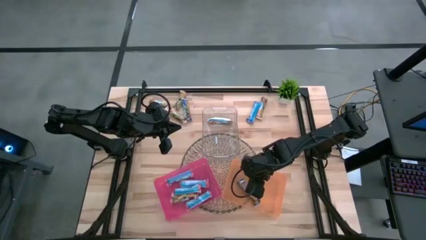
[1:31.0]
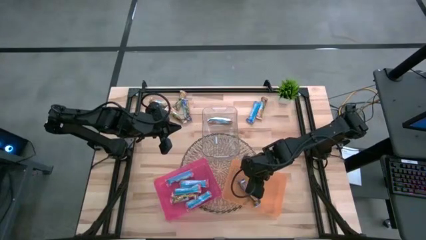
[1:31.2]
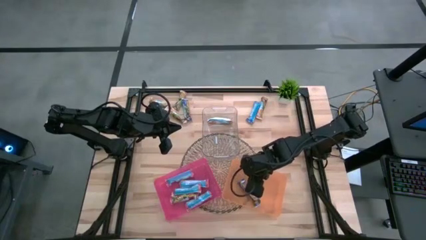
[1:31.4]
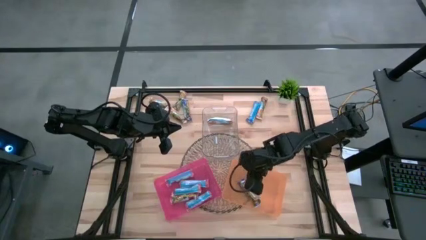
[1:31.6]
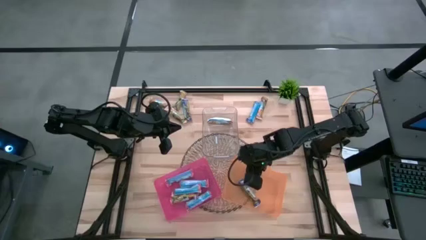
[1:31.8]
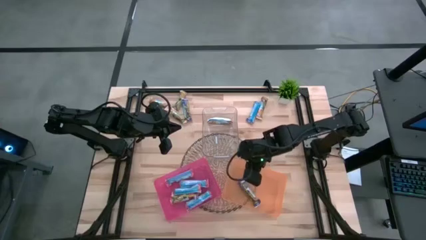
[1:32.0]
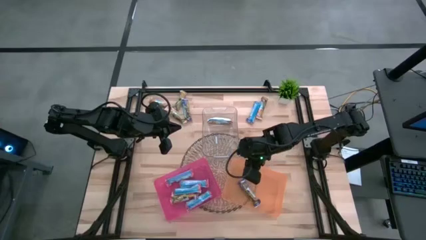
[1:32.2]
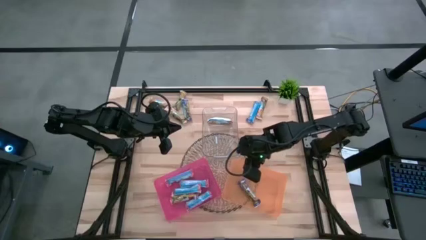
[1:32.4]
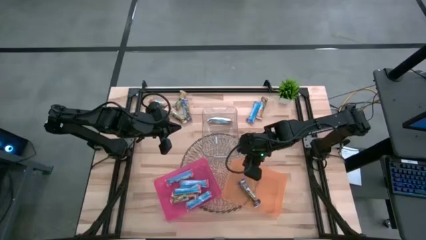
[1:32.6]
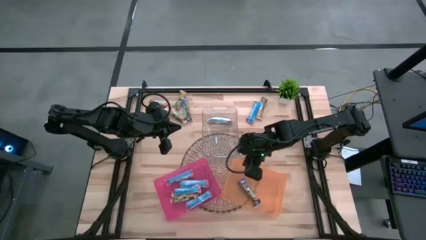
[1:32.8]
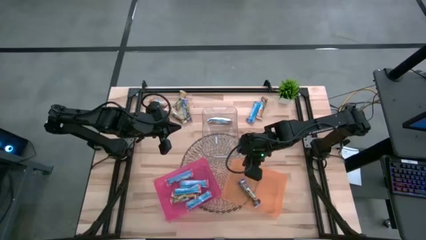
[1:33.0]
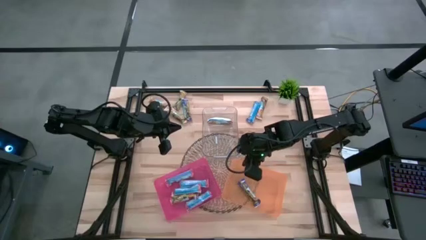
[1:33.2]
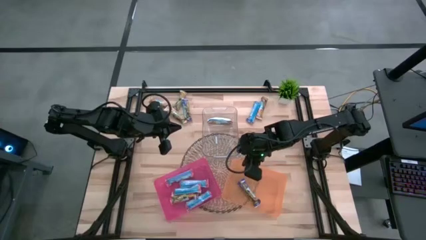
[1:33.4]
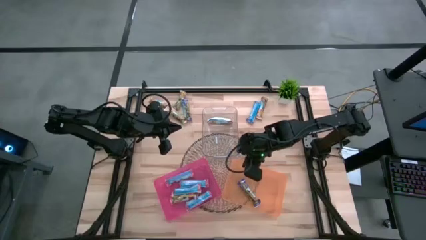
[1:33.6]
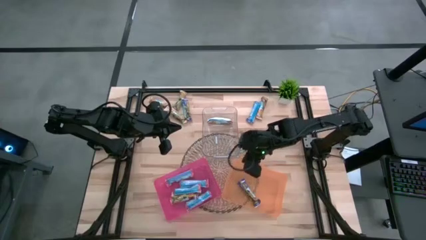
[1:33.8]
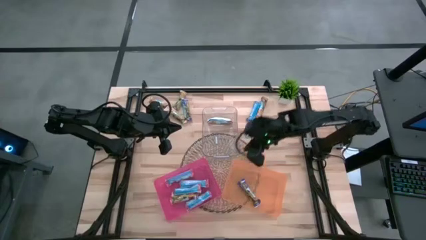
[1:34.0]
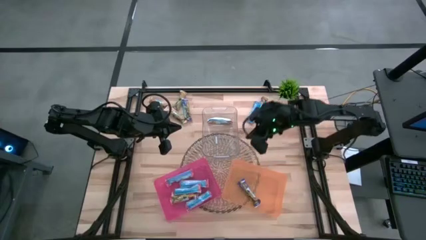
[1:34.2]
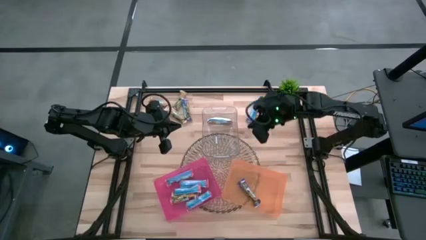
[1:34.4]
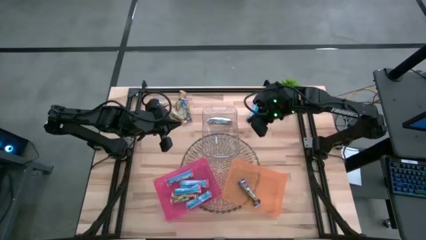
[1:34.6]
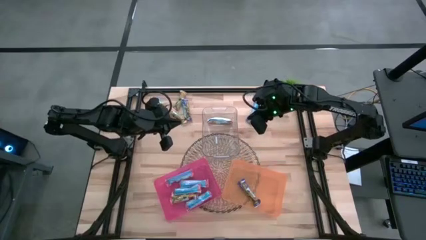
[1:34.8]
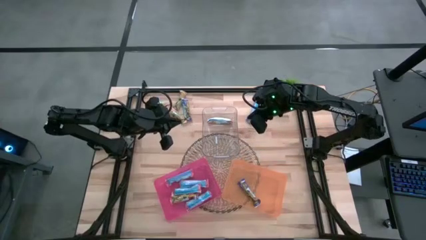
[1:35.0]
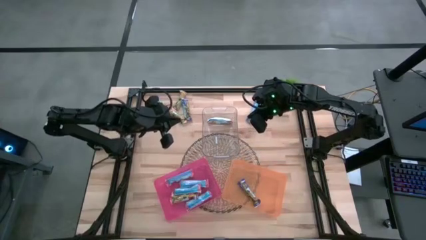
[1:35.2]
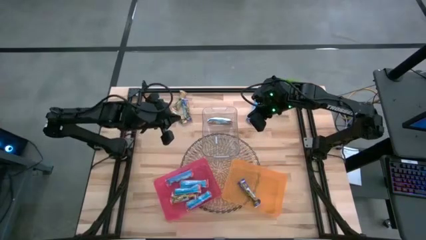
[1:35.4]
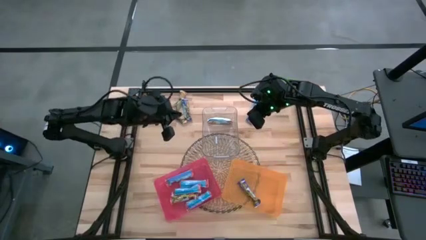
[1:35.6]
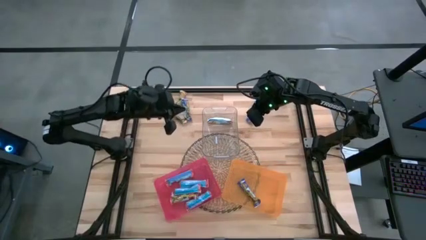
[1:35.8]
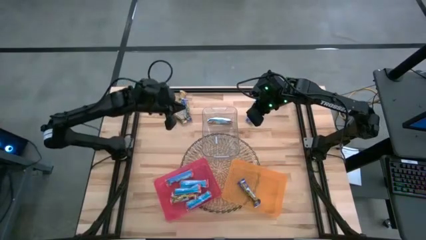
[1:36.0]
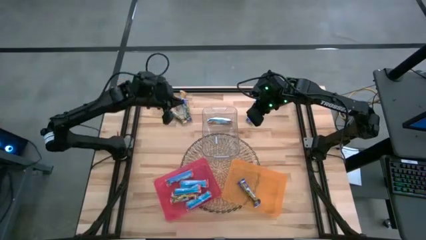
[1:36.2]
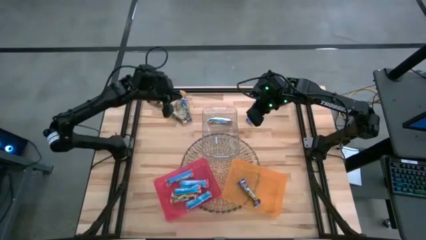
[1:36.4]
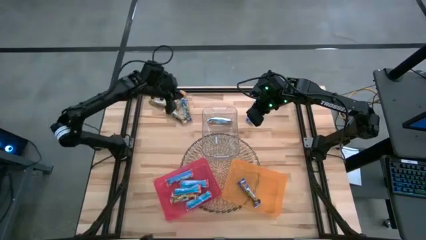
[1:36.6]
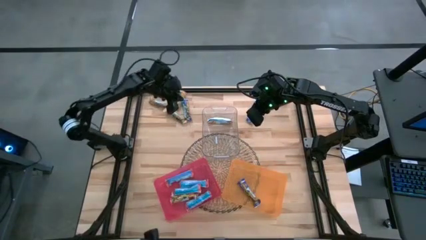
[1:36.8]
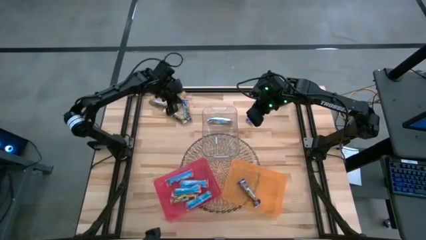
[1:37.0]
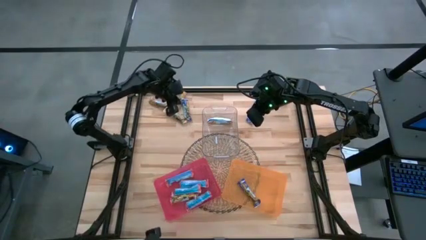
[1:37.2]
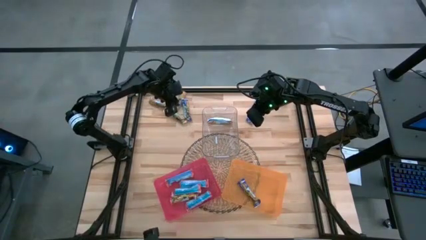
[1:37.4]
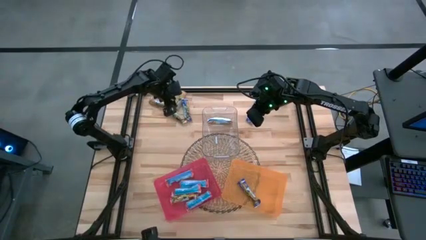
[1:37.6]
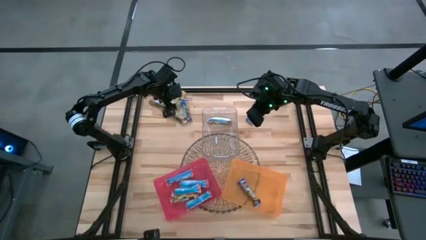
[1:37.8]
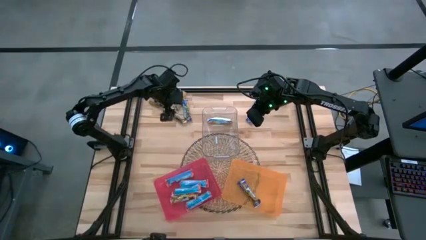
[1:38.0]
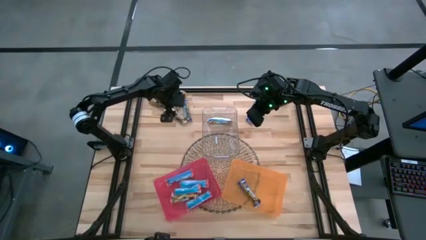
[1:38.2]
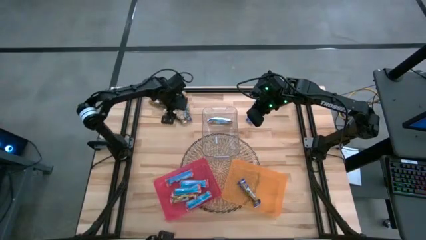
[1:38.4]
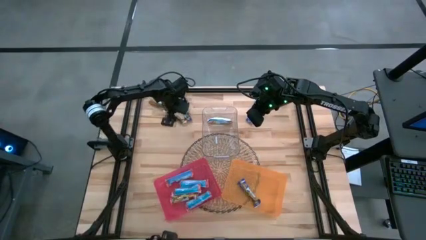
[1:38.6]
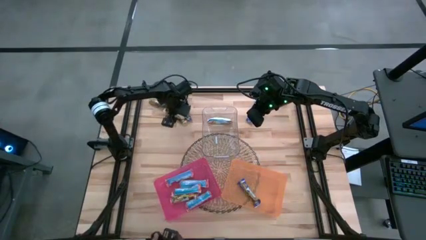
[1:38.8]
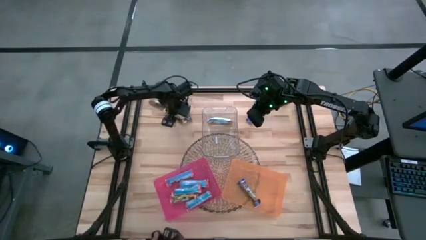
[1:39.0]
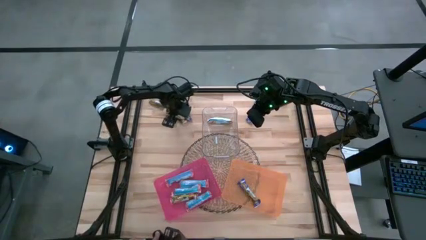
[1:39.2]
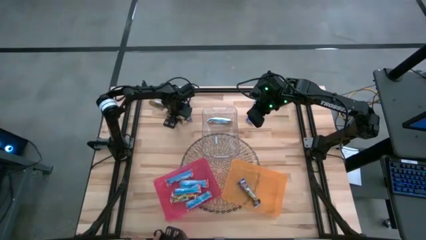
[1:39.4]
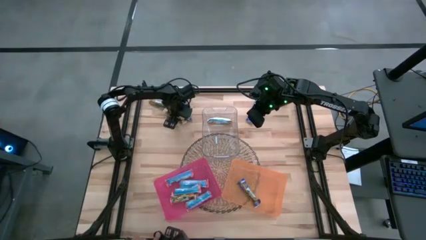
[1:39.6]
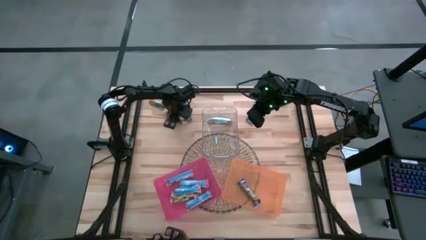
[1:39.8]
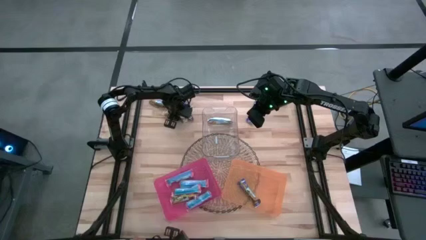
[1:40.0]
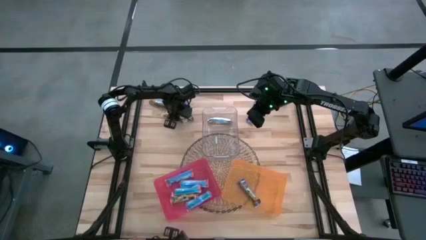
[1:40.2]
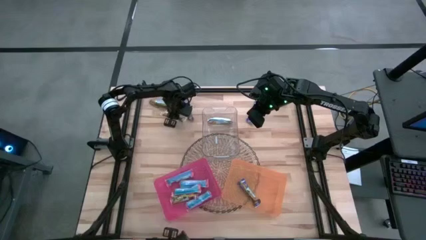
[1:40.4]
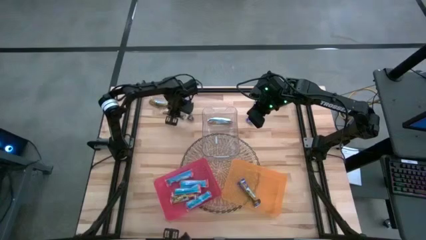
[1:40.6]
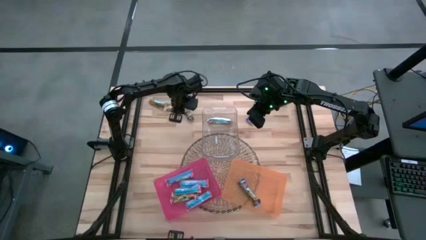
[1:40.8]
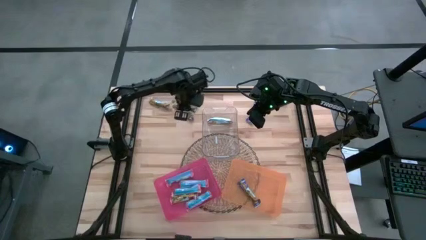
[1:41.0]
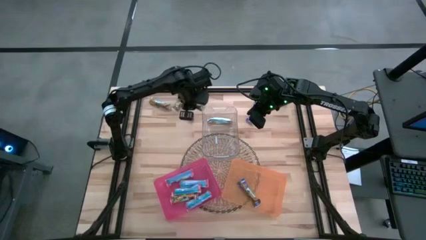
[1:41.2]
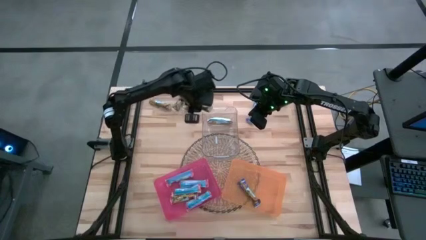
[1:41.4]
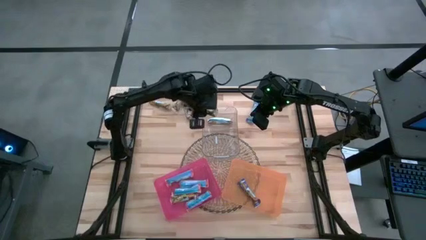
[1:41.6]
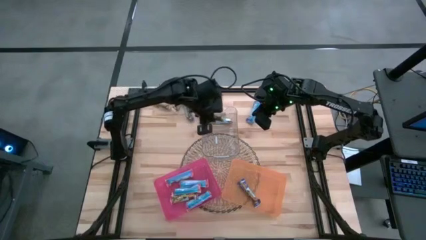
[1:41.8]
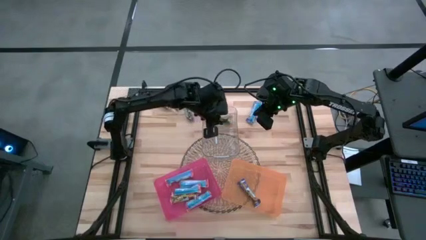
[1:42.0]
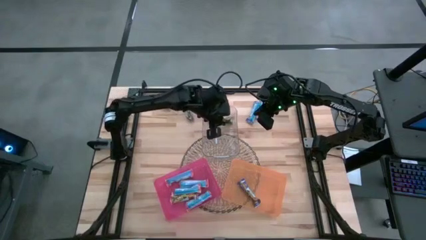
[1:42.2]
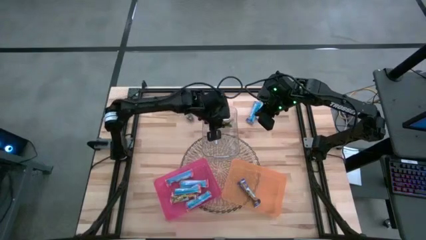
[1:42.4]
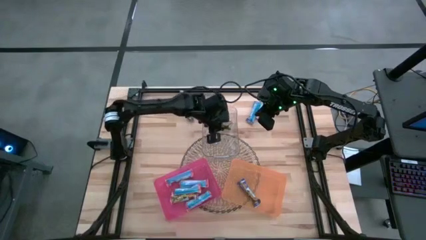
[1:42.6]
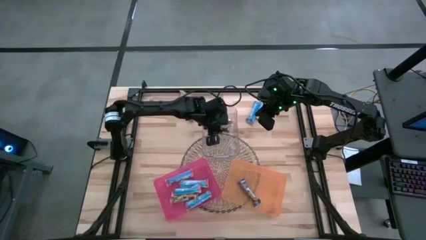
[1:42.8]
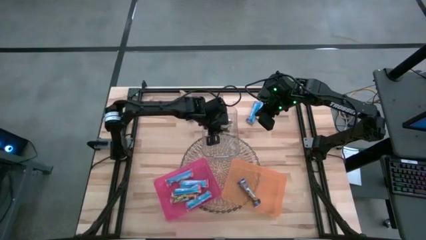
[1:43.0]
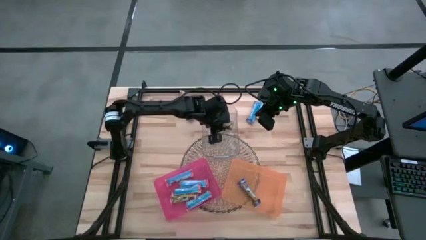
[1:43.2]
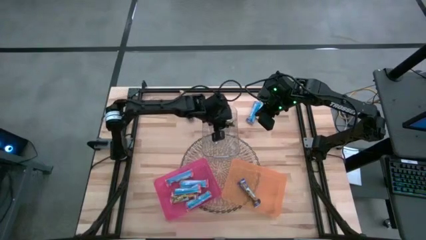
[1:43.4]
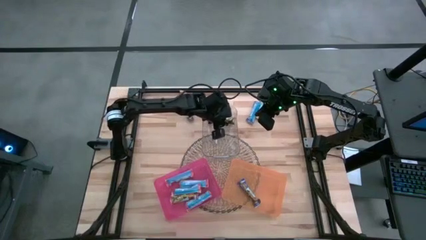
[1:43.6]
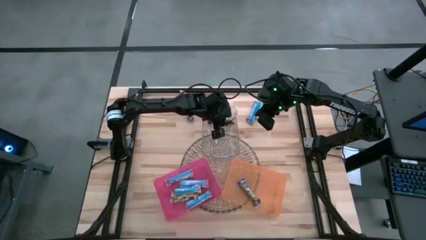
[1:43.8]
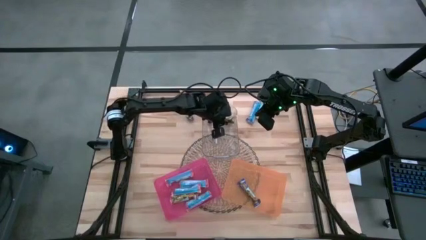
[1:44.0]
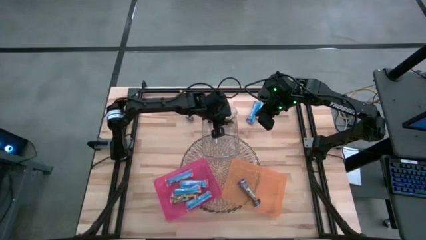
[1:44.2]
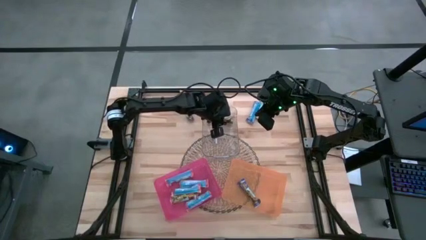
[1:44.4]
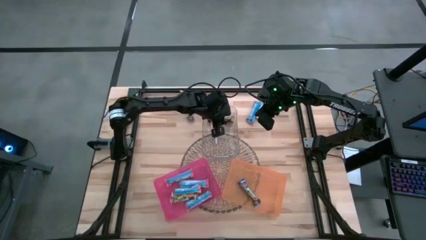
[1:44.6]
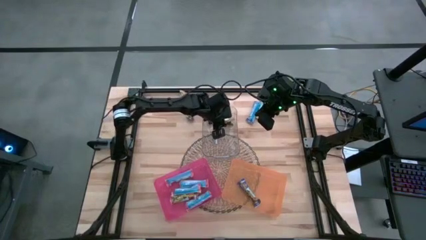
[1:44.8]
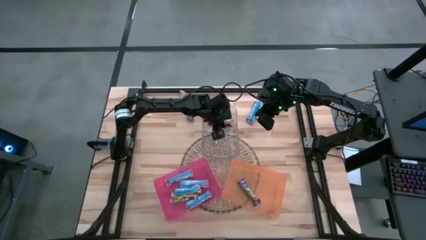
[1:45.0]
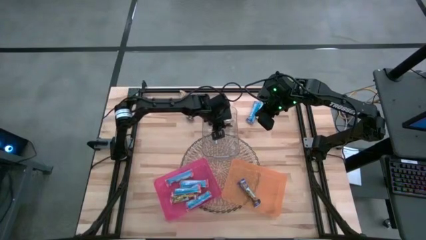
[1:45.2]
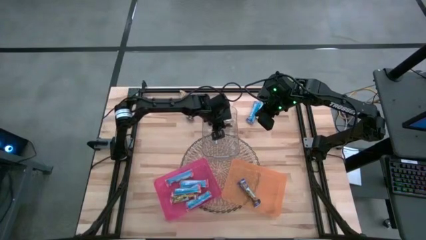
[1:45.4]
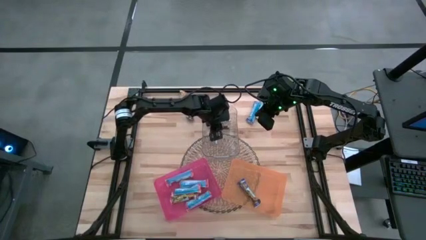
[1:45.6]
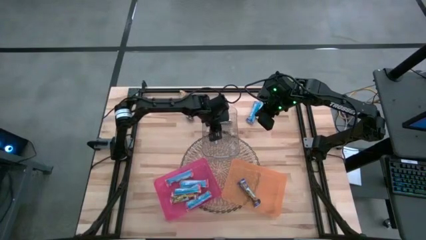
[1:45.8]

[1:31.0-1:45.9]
Task: Pick and place Granola Bars by type
Put the orange granola bar into the transparent bin
